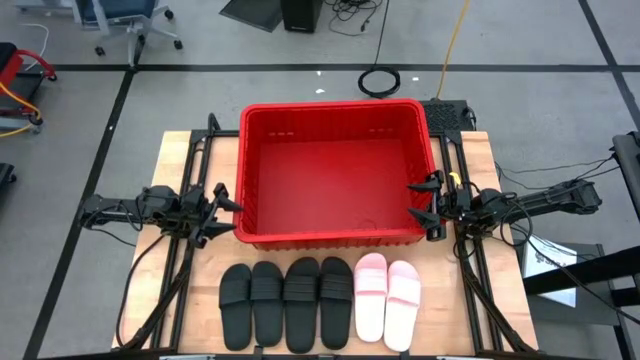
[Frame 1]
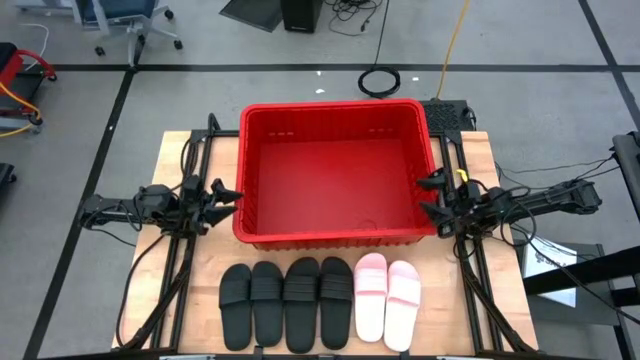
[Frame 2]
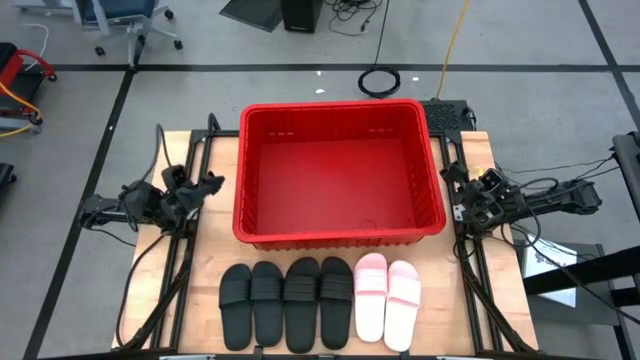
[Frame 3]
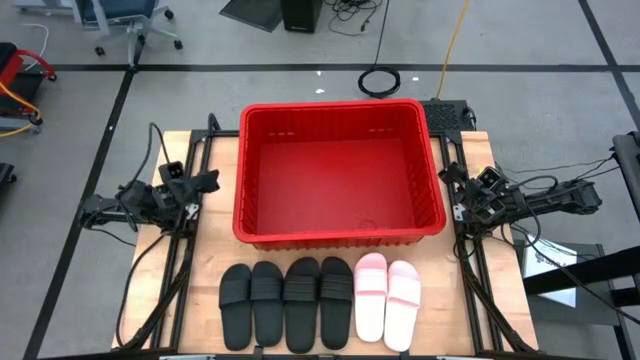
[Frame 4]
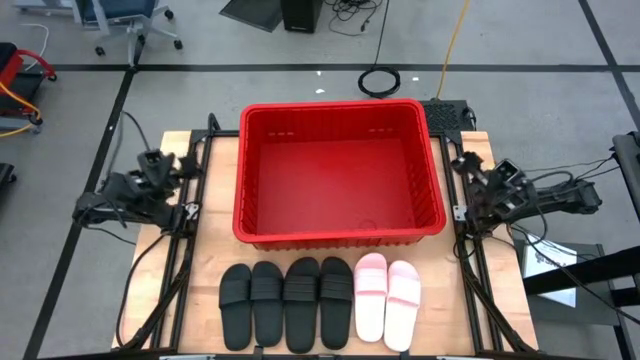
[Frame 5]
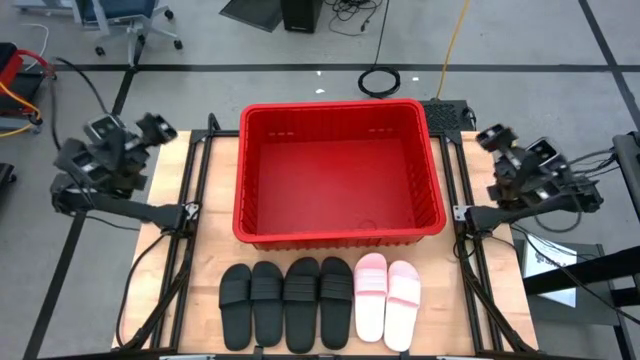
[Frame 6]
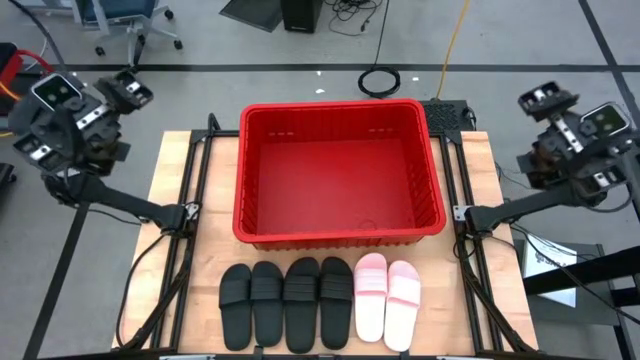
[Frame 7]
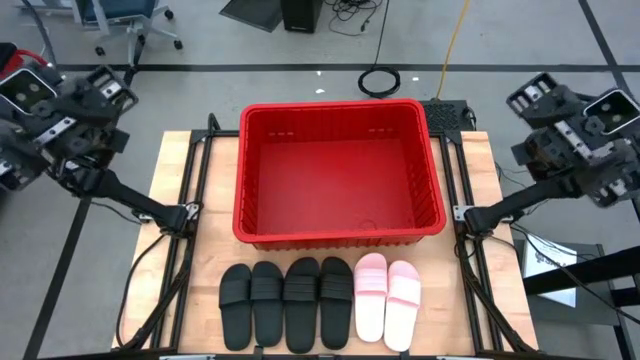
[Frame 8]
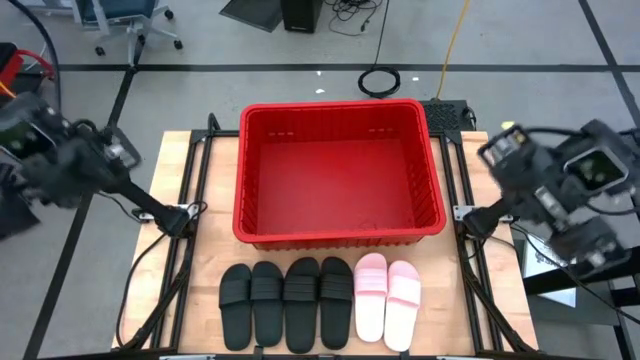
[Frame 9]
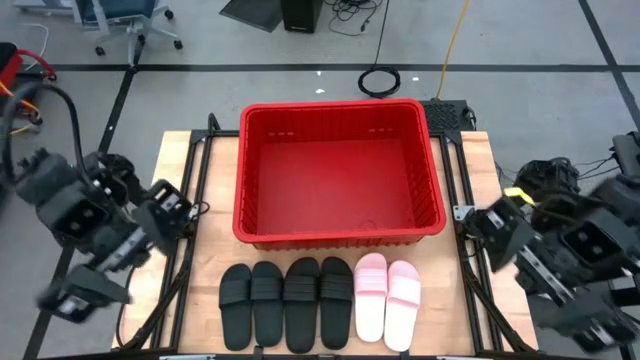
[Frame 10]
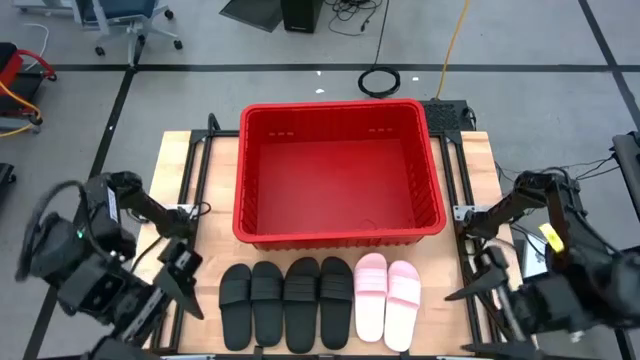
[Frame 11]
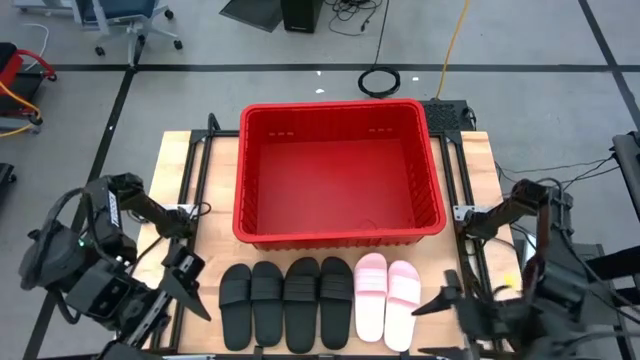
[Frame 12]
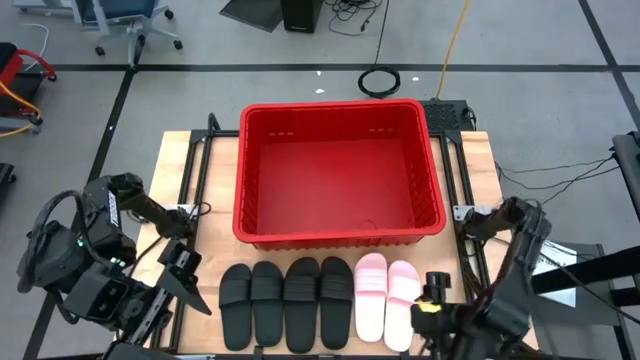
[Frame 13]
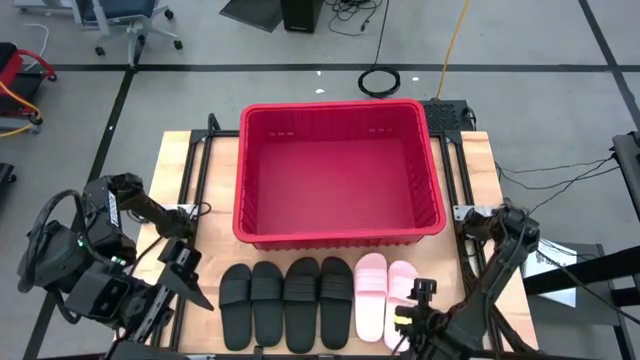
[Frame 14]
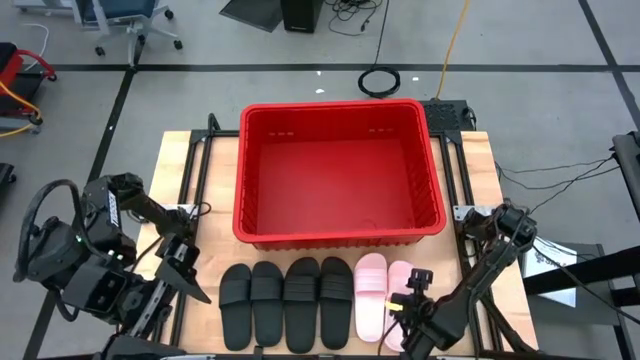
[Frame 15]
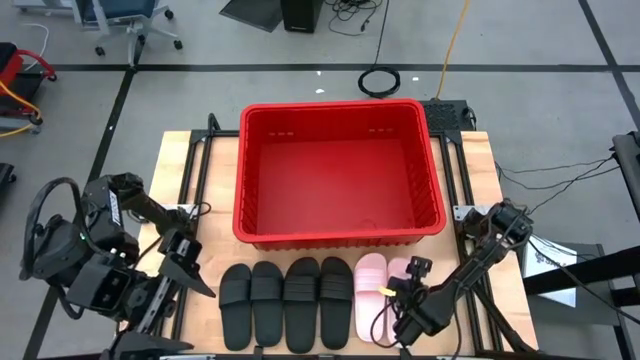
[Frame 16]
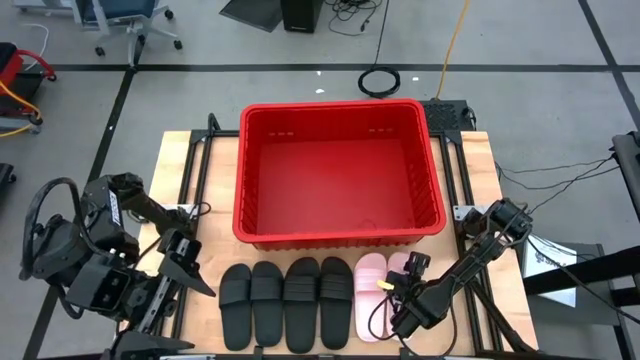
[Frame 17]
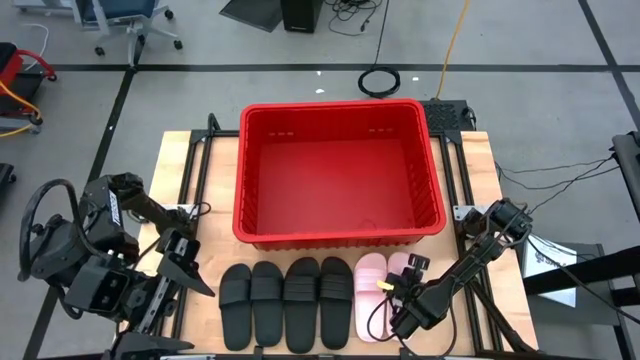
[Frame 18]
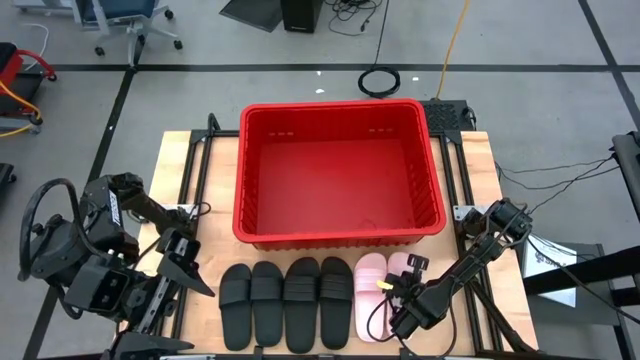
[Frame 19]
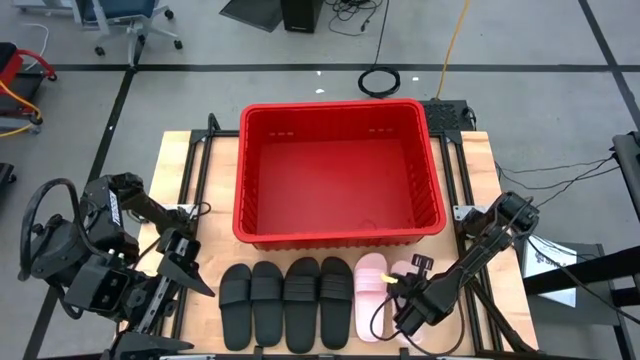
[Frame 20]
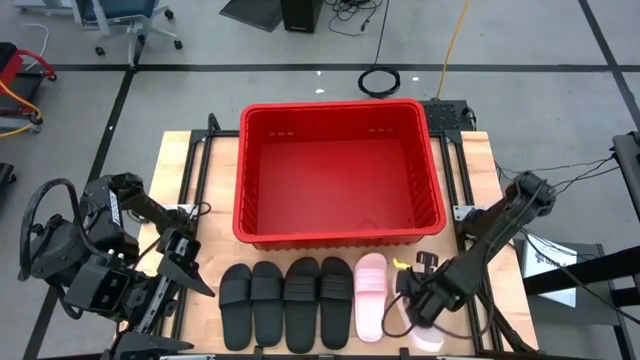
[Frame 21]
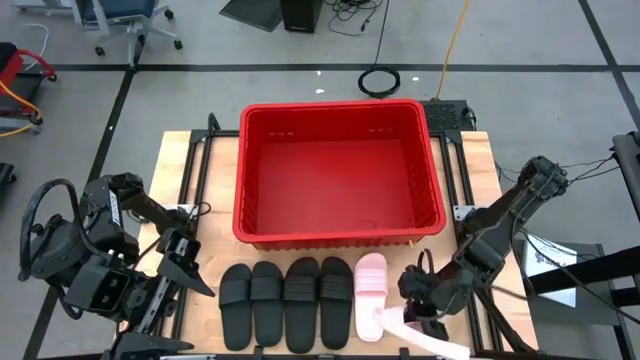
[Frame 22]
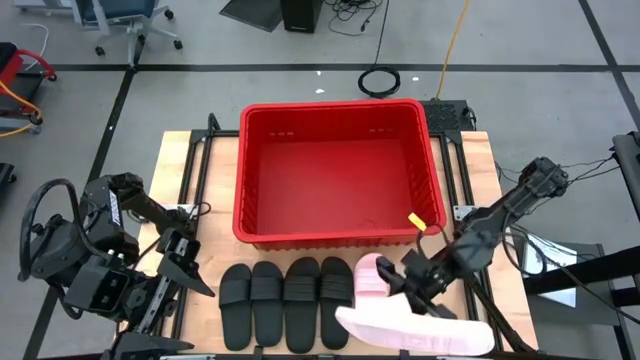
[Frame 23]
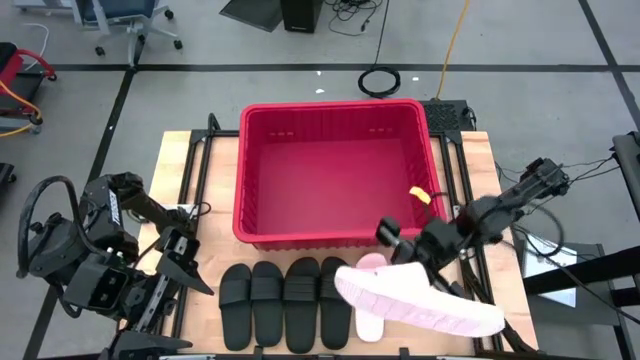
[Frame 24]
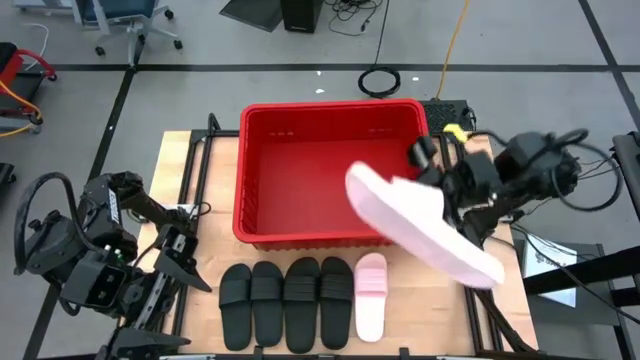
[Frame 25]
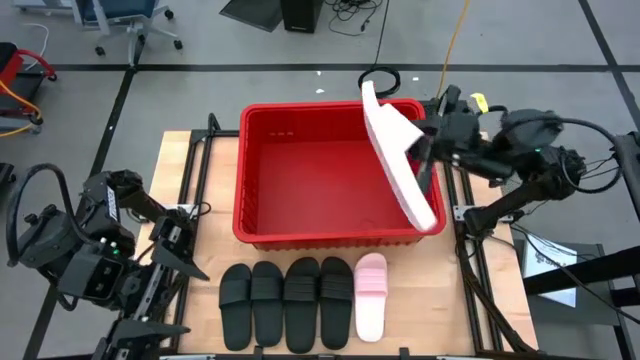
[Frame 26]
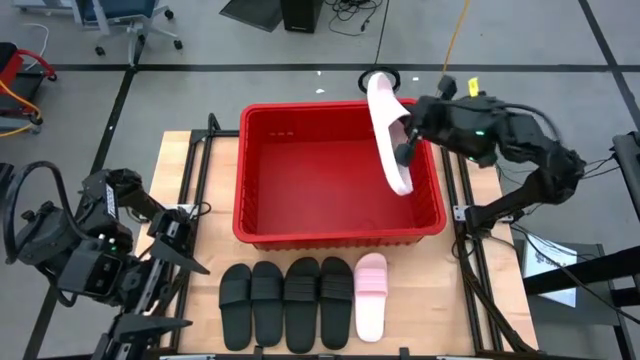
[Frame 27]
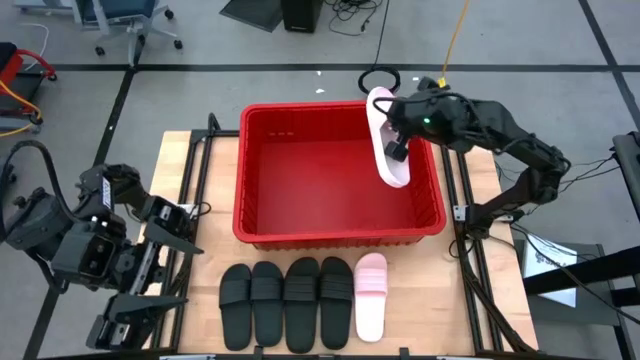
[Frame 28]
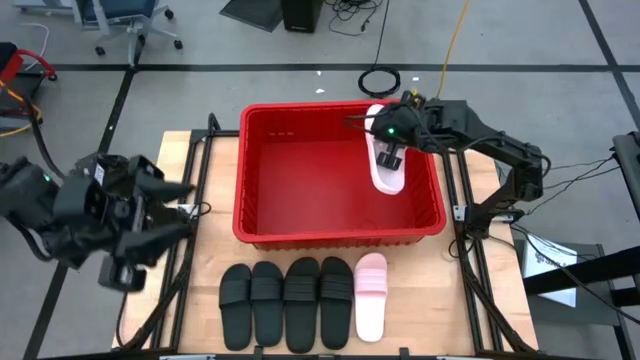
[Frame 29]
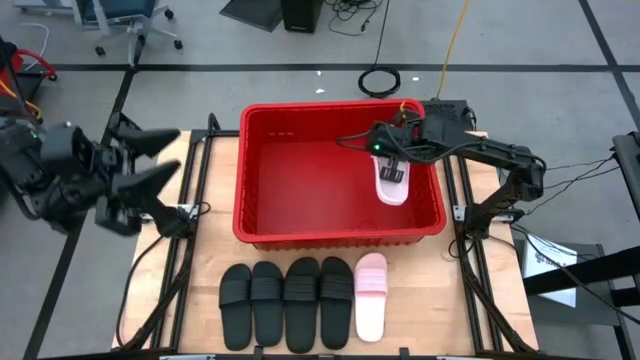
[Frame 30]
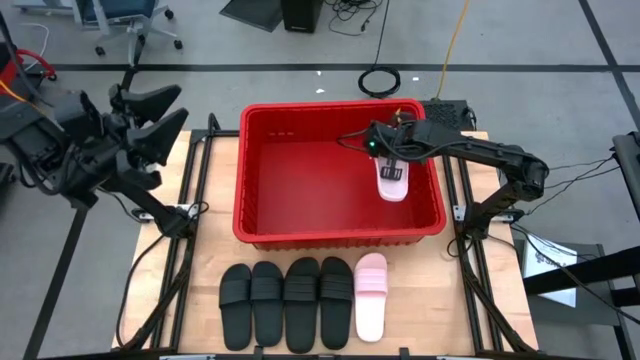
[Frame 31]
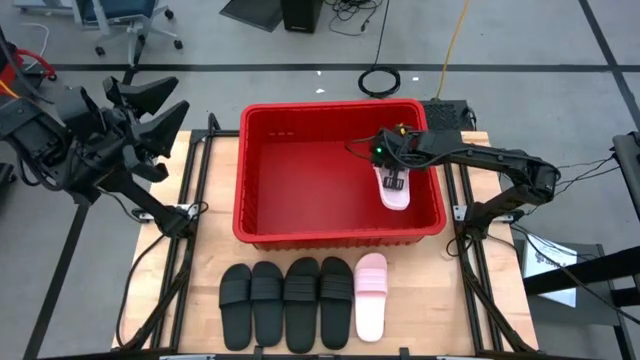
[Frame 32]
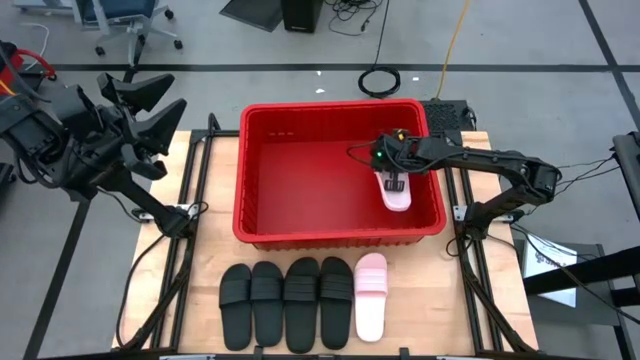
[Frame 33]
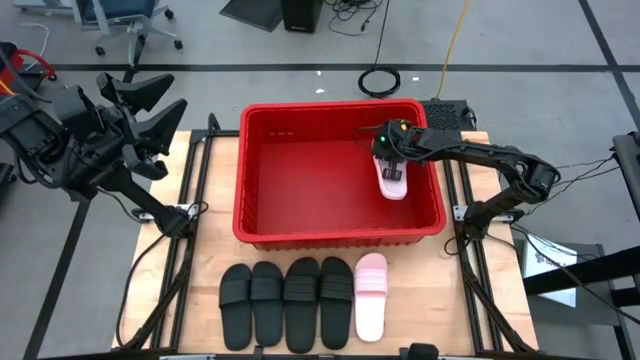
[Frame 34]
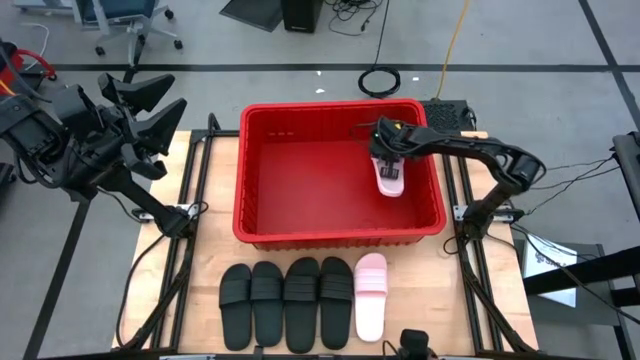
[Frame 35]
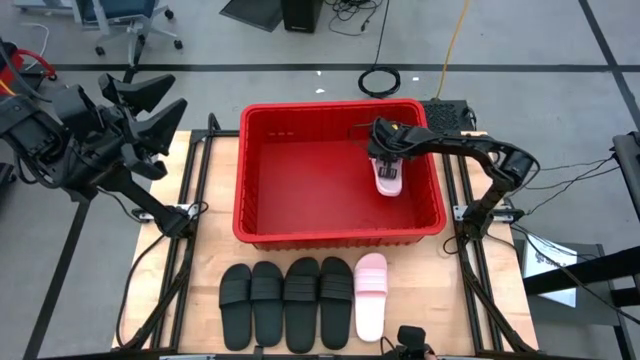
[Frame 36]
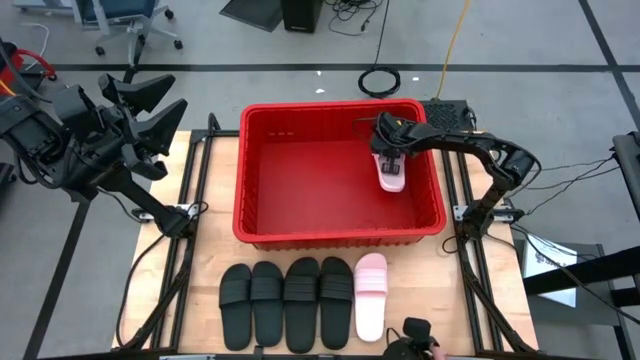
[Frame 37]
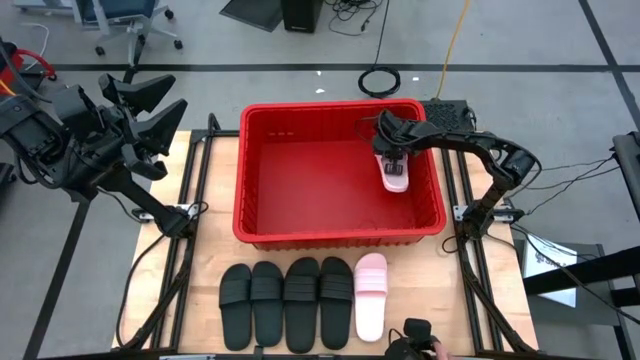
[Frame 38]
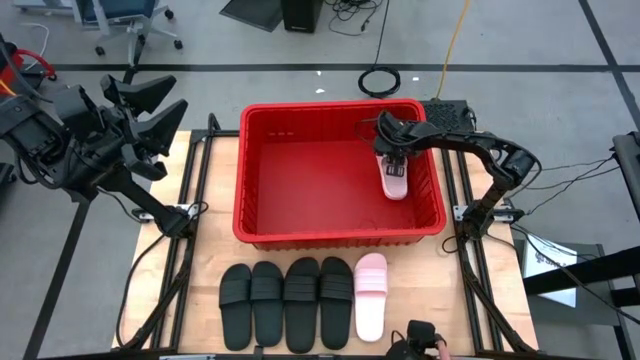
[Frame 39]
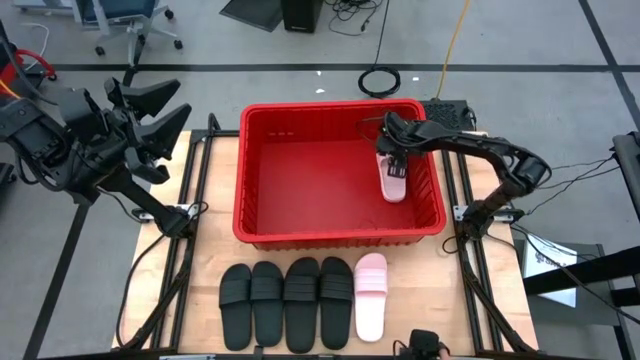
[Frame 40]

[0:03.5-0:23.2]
Task: Pick and place slides into bin
Put the pink slide into the red bin
